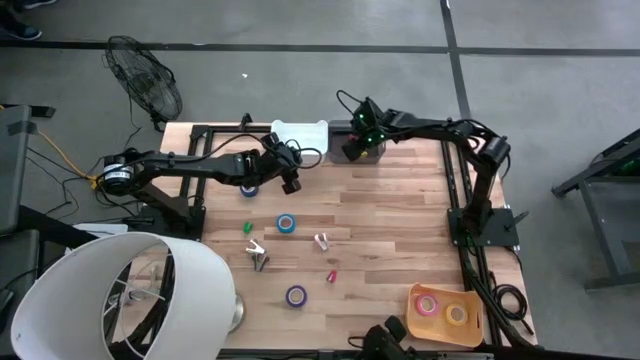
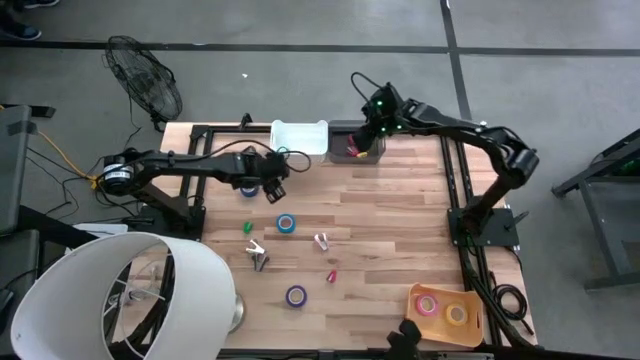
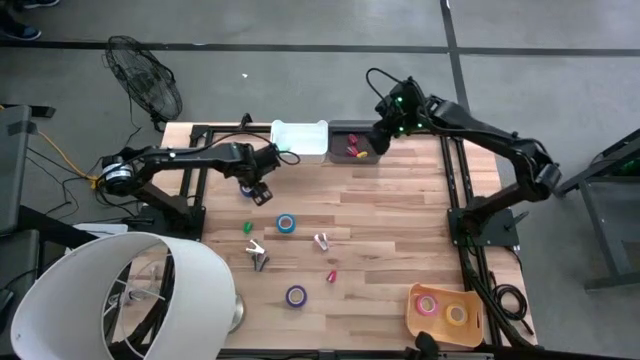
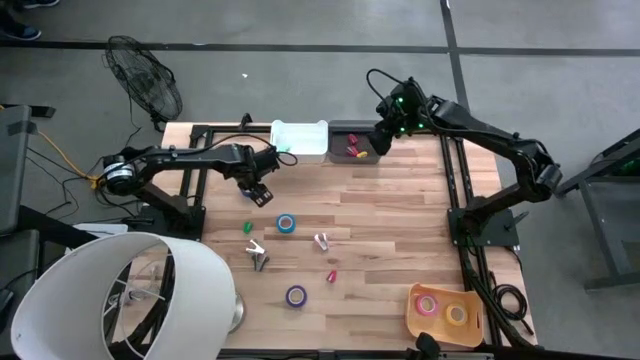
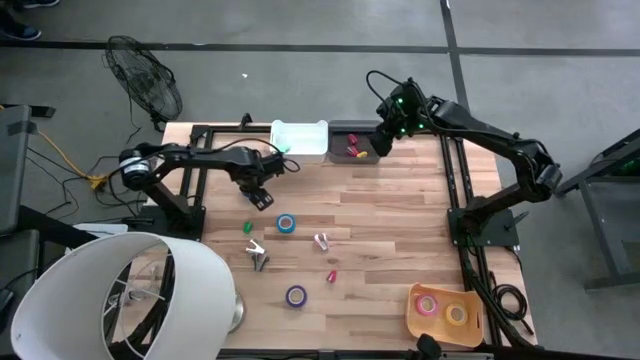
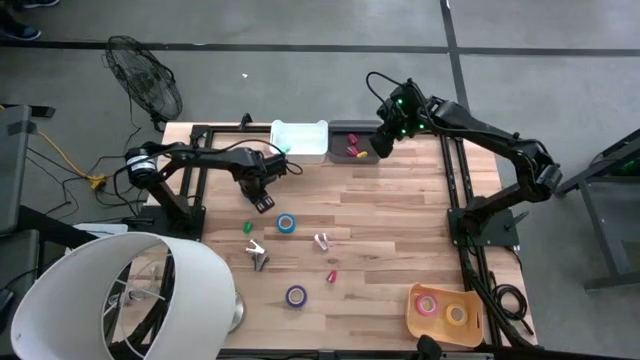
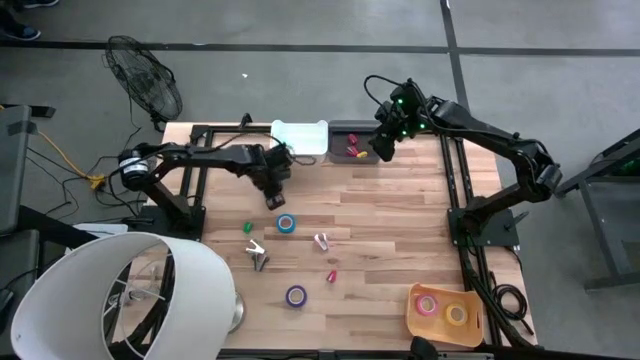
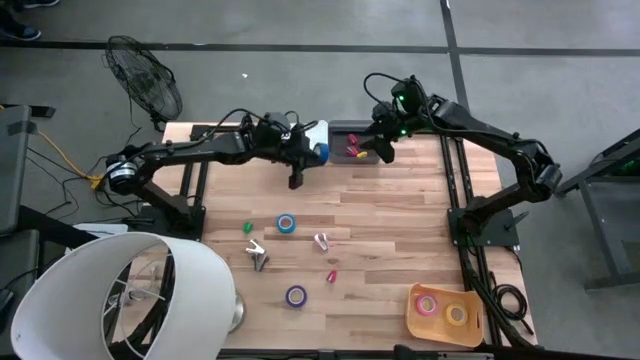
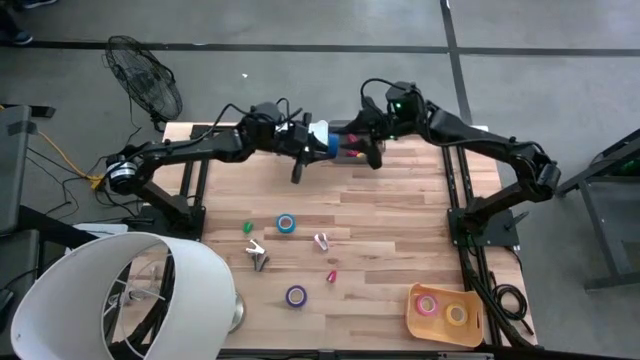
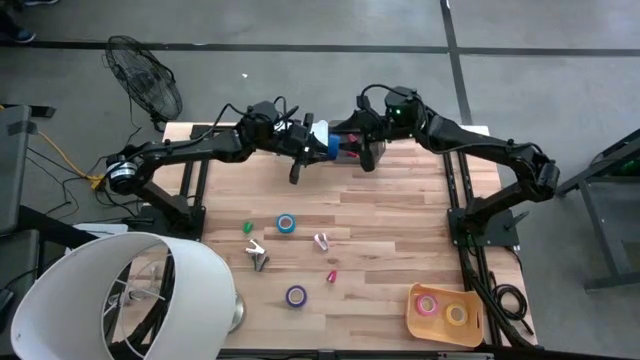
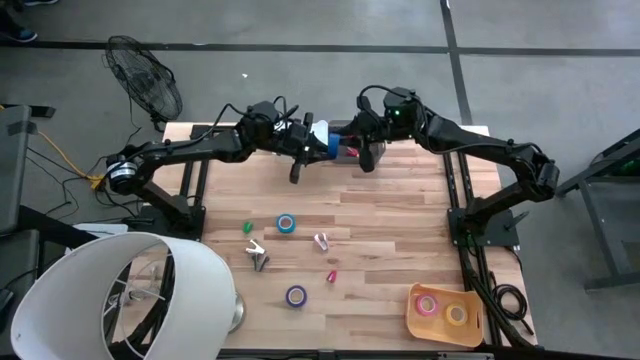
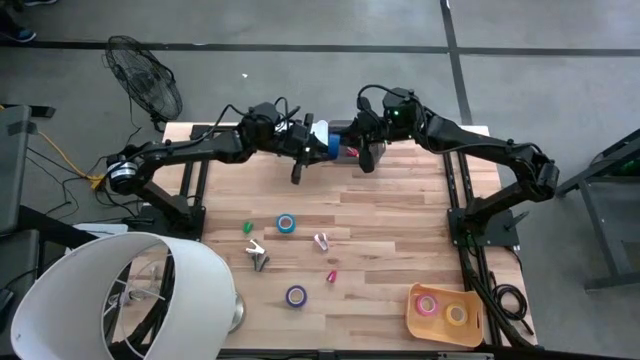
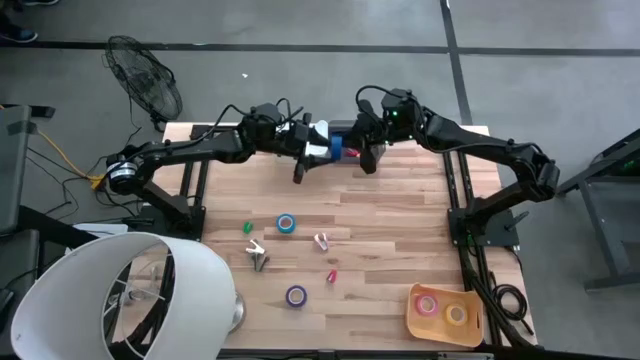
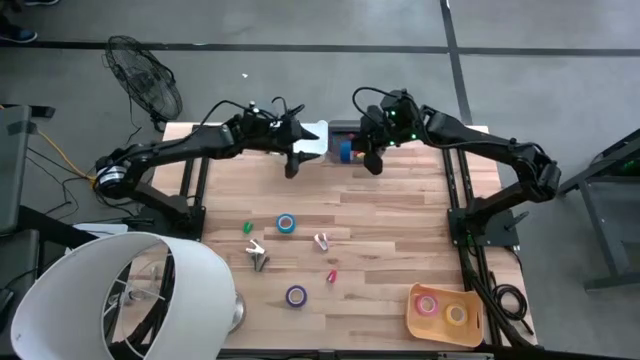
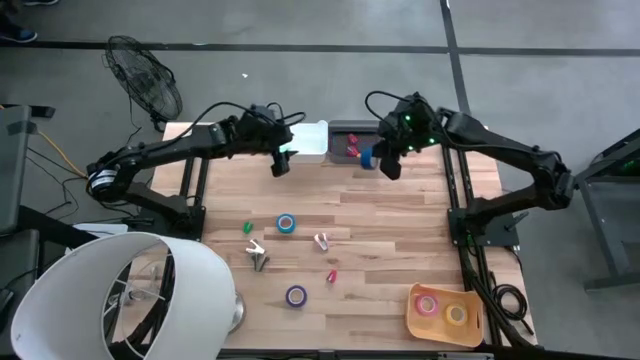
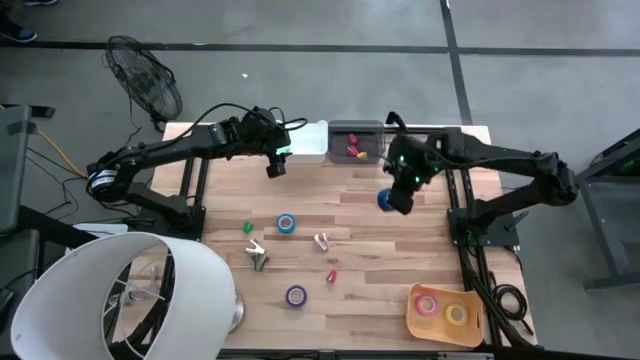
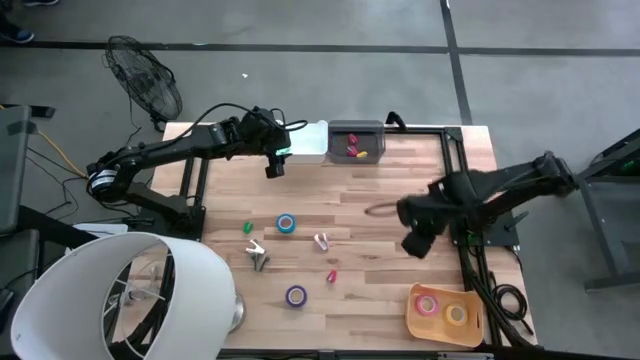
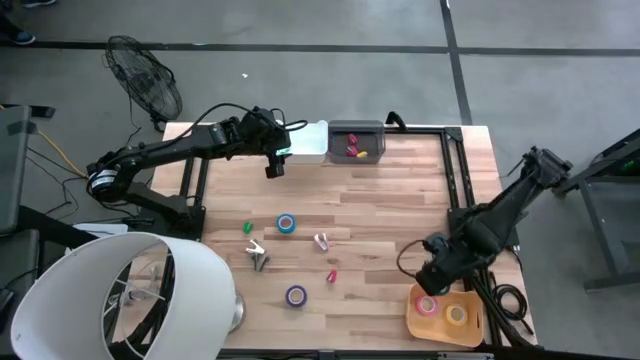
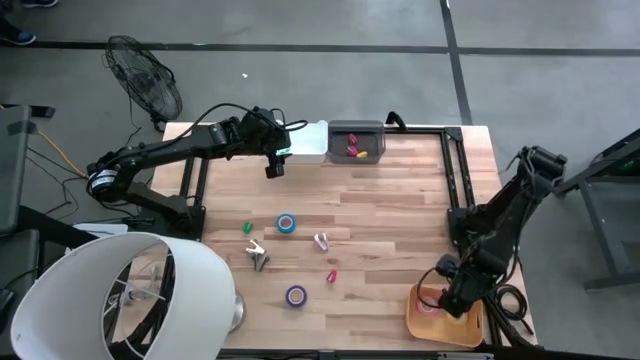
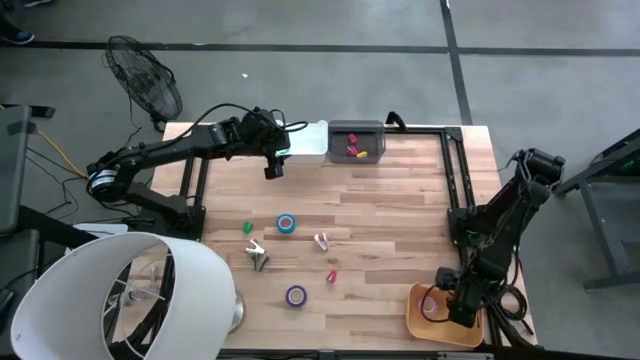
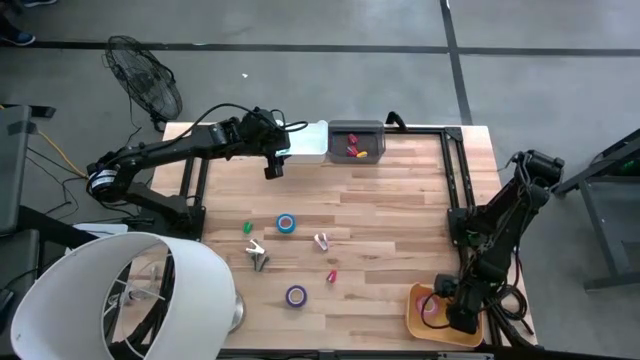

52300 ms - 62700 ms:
Task: Pick and place Stapler, Stapler remover, tape
Put the top dark blue tape into the yellow bin

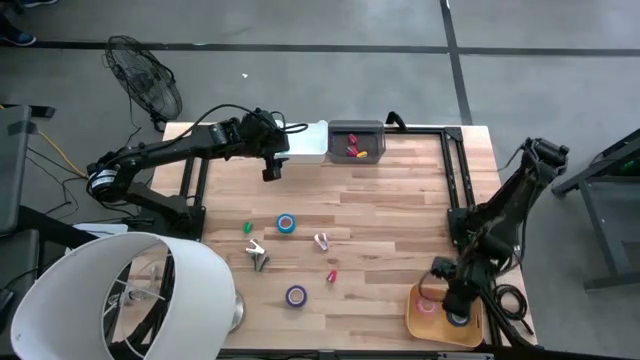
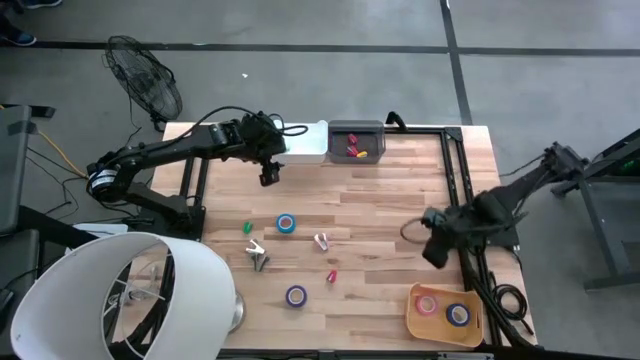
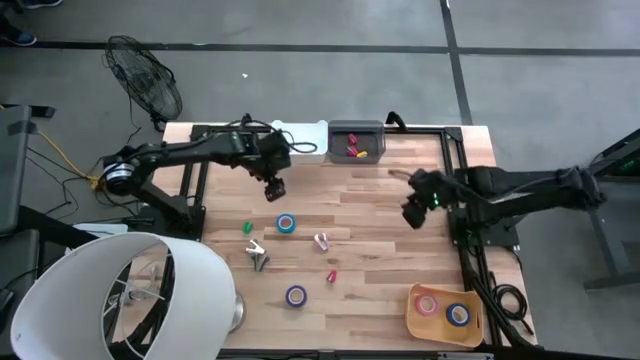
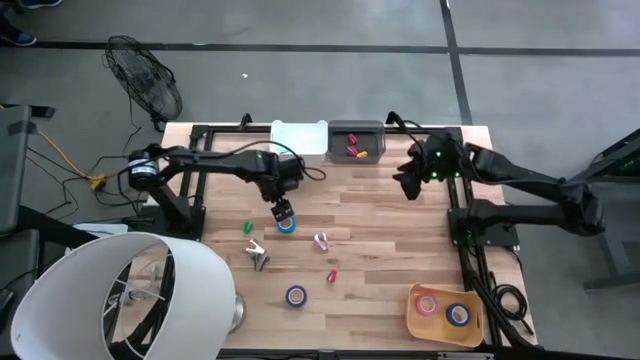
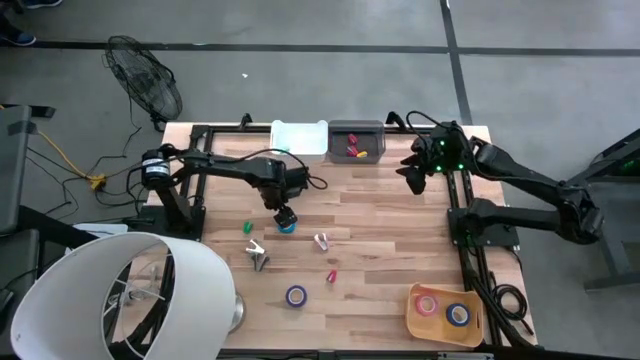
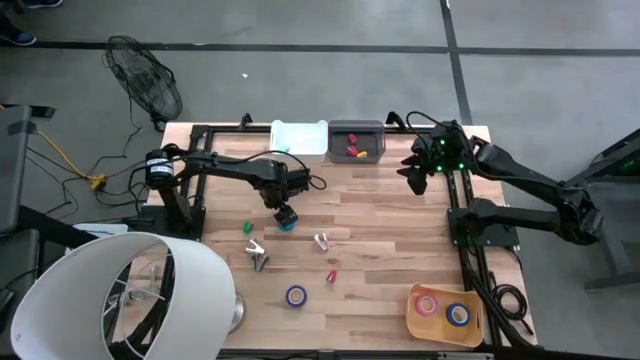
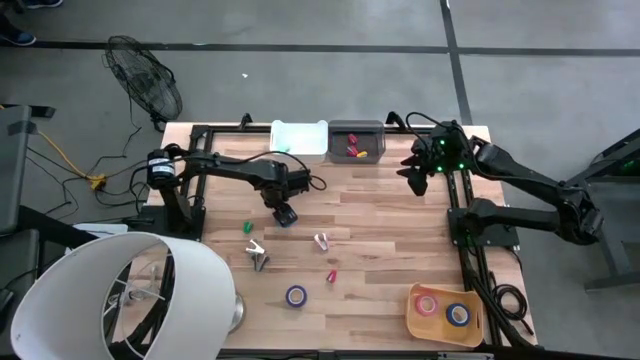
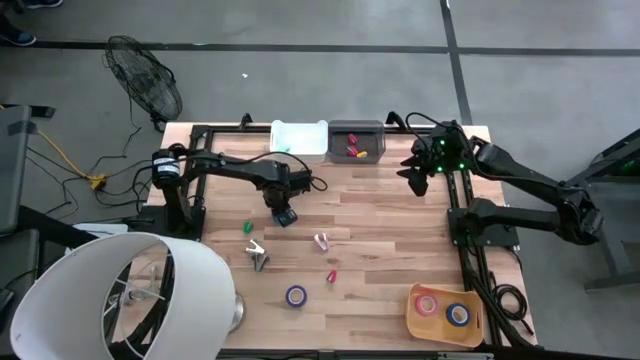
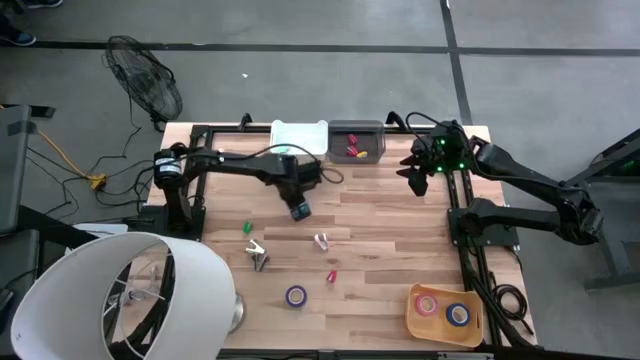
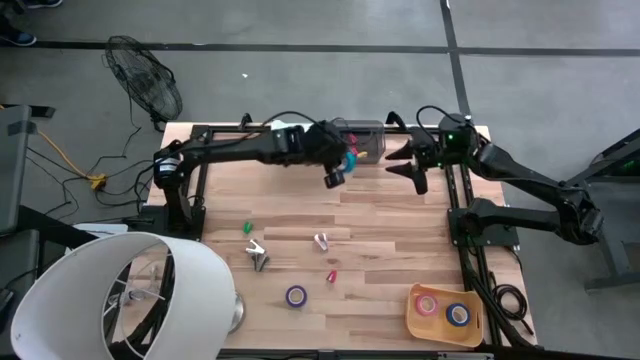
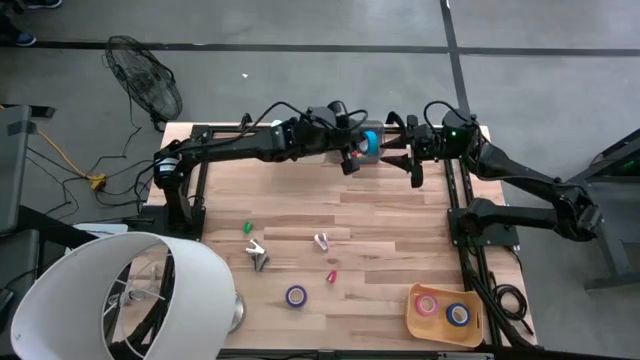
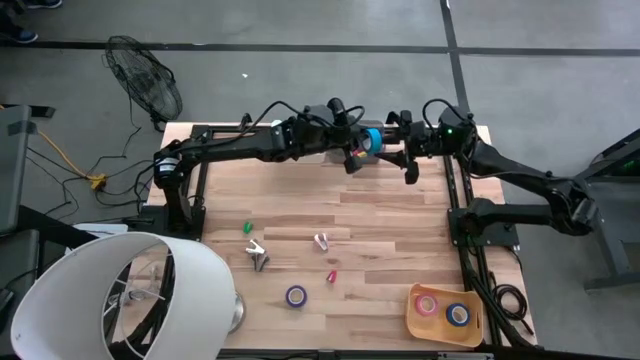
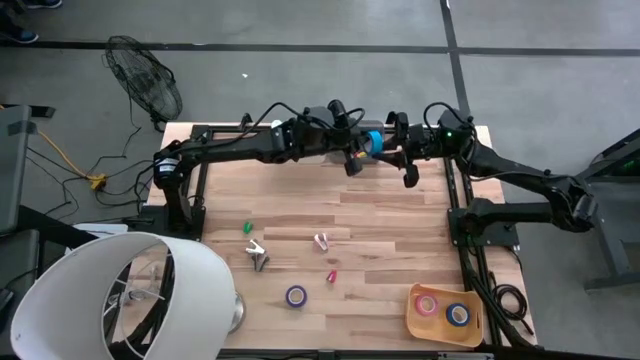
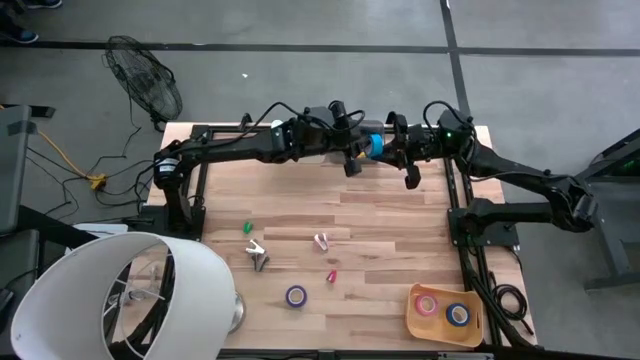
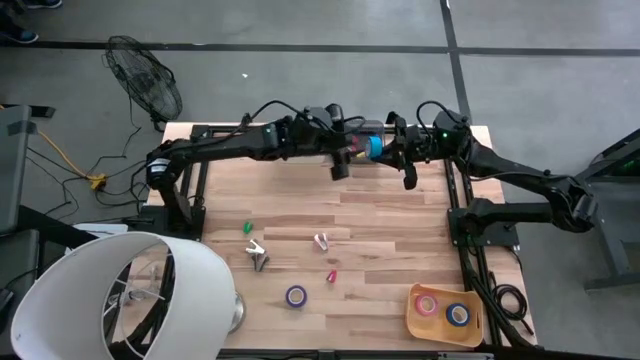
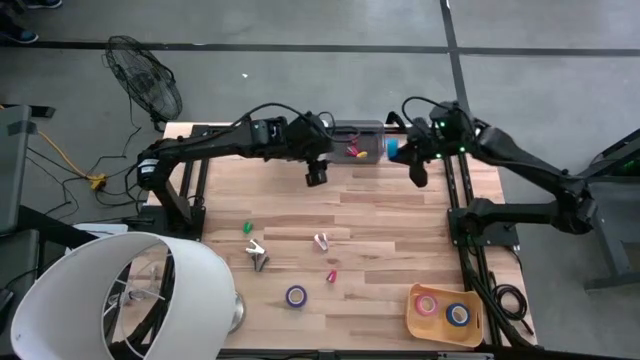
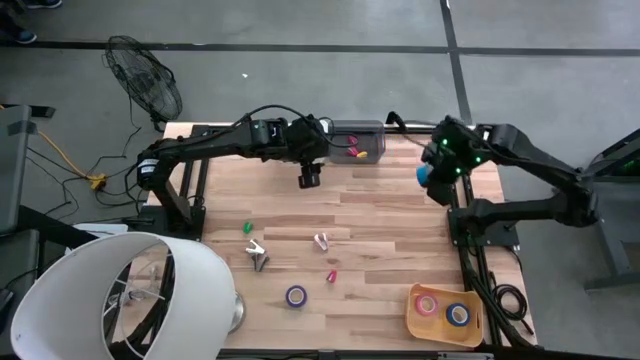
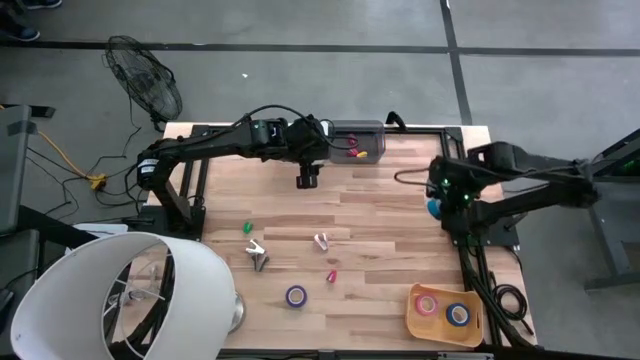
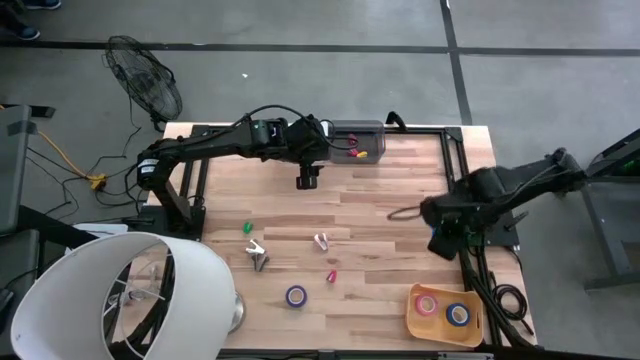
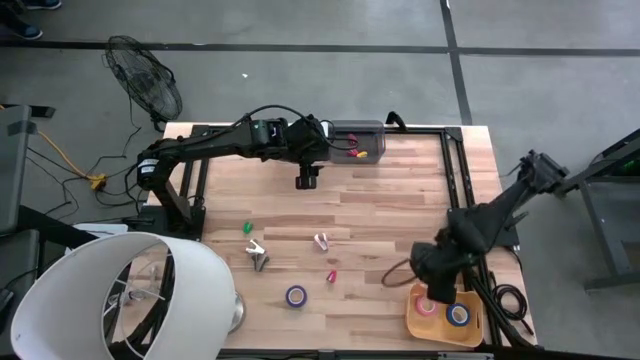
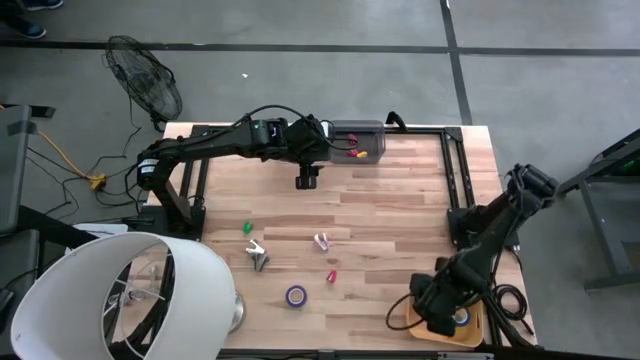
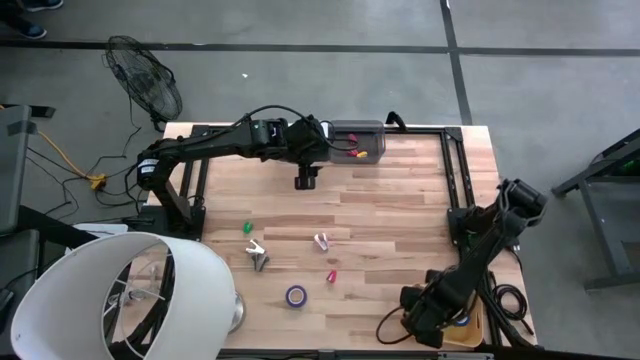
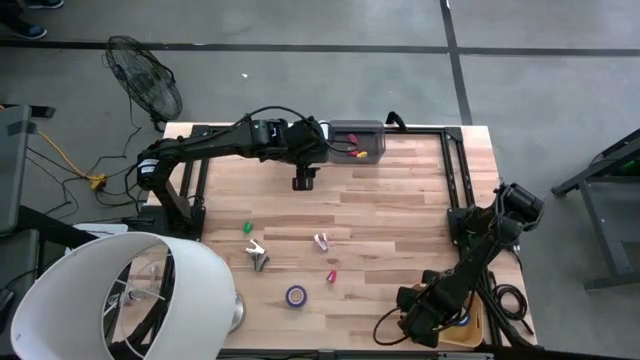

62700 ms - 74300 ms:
Put the light blue tape into the yellow bin
